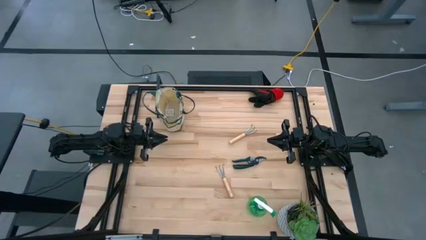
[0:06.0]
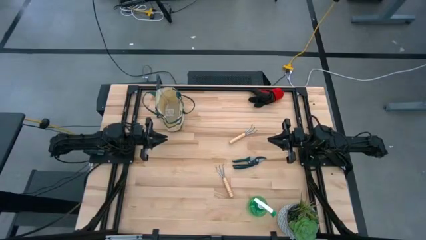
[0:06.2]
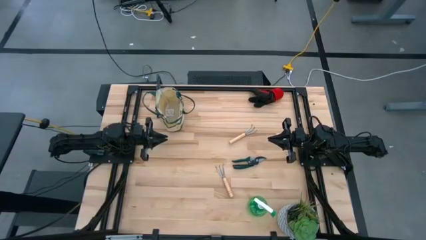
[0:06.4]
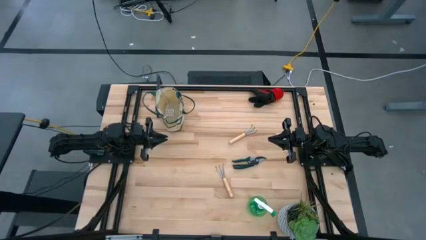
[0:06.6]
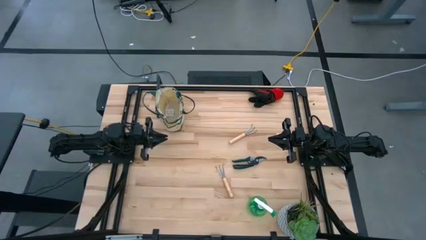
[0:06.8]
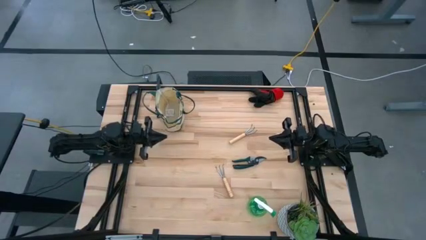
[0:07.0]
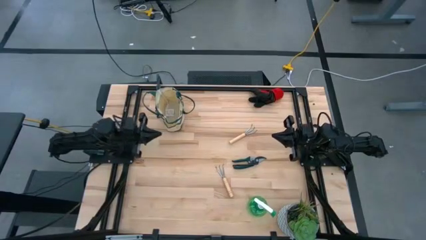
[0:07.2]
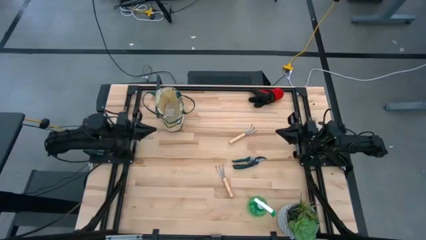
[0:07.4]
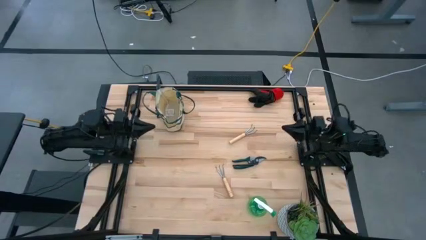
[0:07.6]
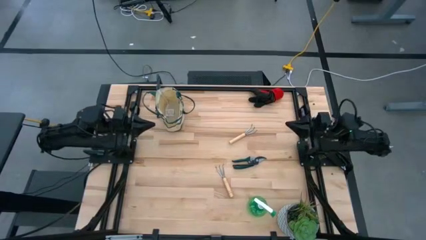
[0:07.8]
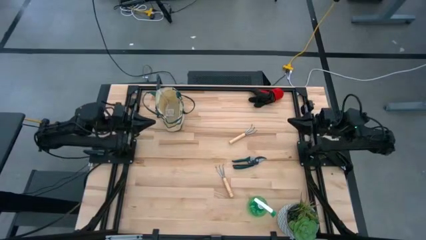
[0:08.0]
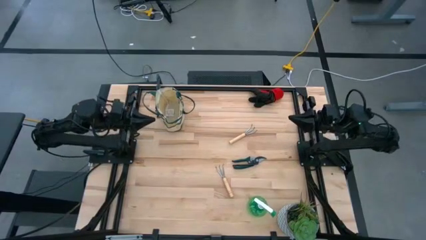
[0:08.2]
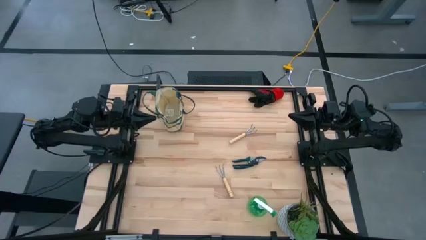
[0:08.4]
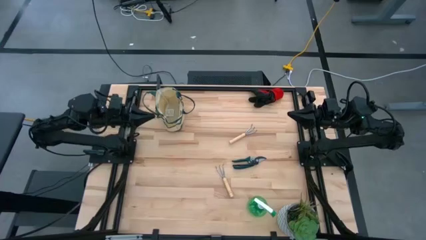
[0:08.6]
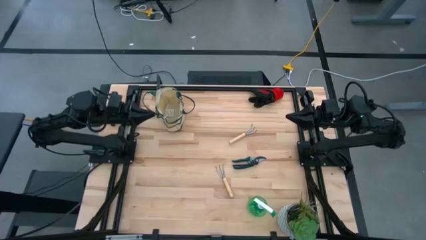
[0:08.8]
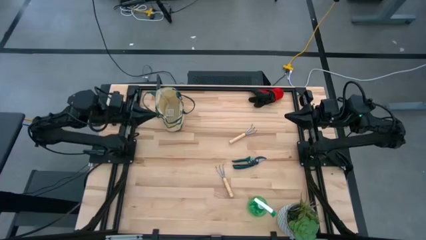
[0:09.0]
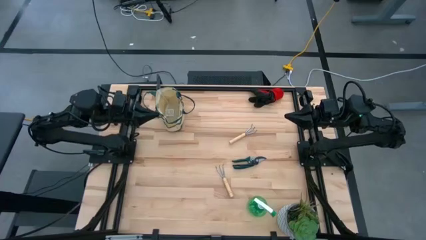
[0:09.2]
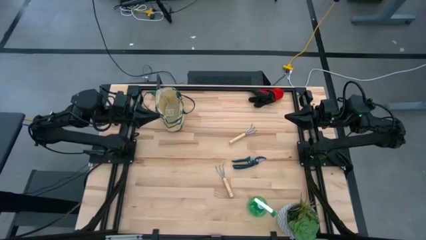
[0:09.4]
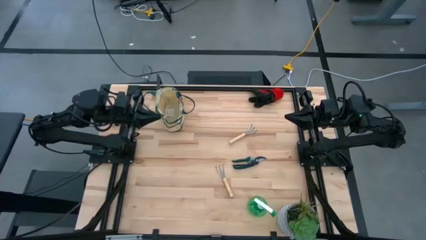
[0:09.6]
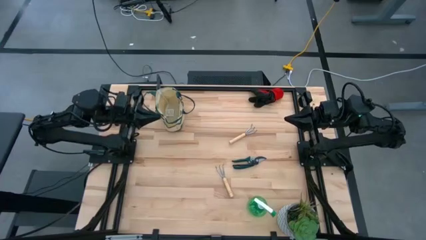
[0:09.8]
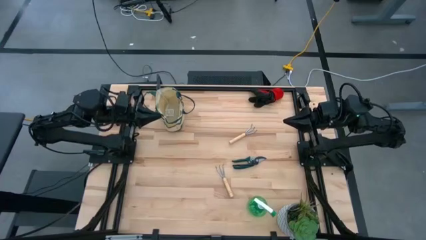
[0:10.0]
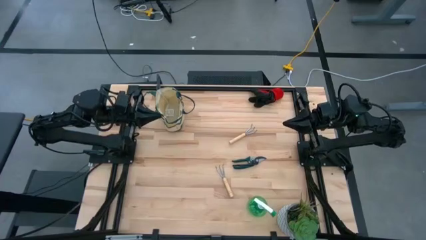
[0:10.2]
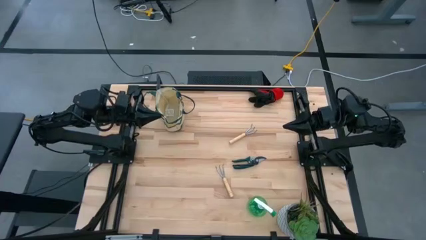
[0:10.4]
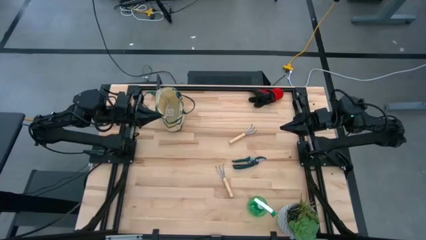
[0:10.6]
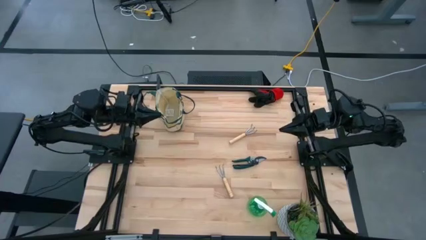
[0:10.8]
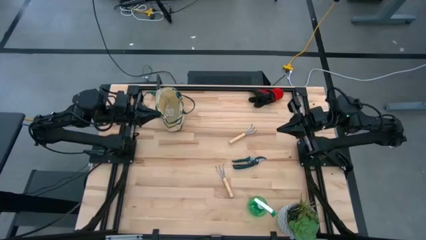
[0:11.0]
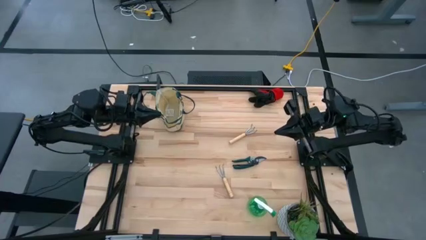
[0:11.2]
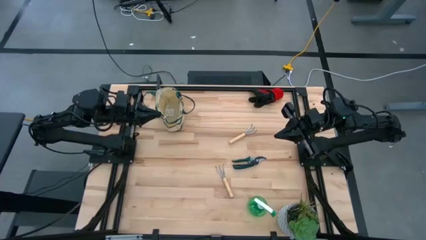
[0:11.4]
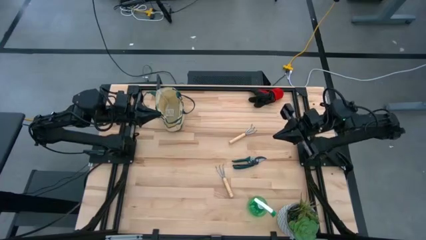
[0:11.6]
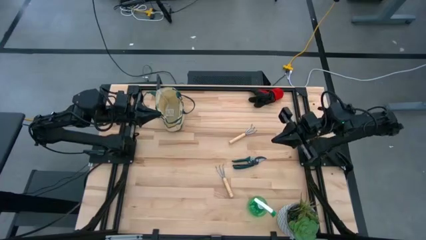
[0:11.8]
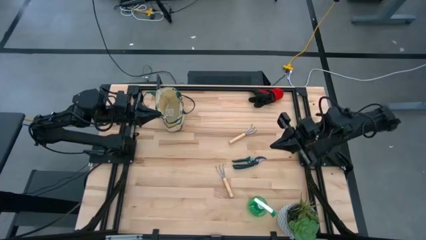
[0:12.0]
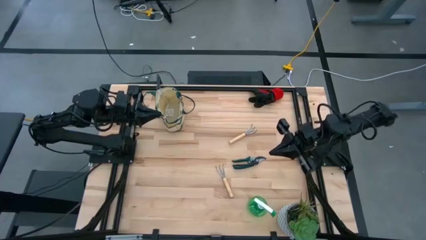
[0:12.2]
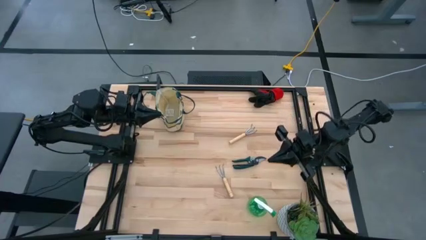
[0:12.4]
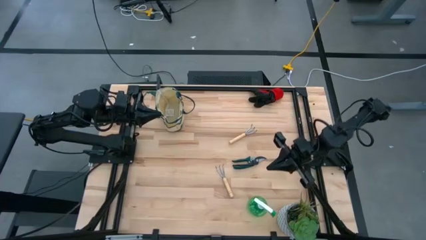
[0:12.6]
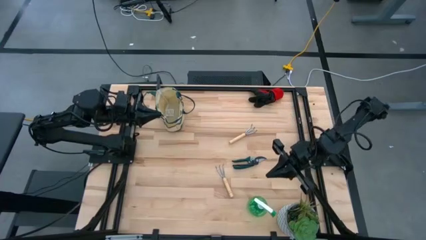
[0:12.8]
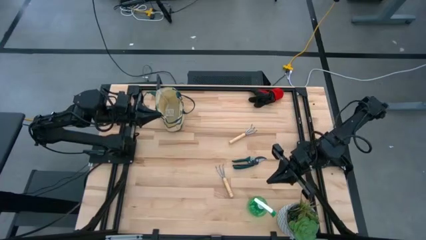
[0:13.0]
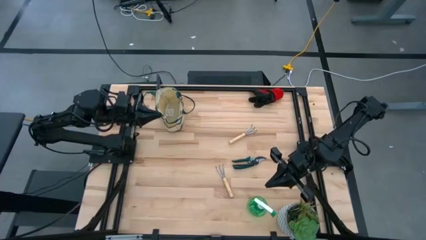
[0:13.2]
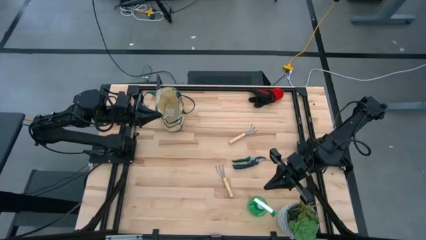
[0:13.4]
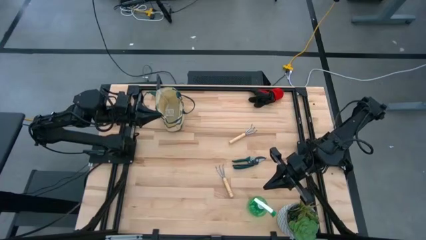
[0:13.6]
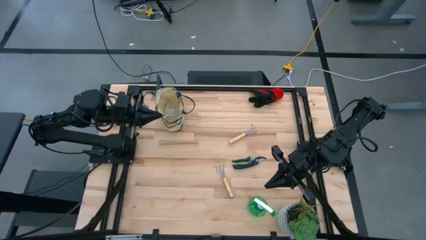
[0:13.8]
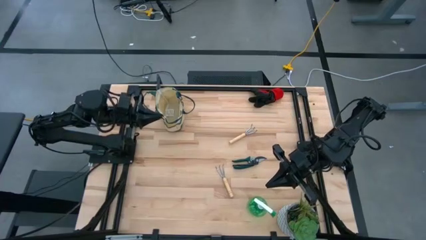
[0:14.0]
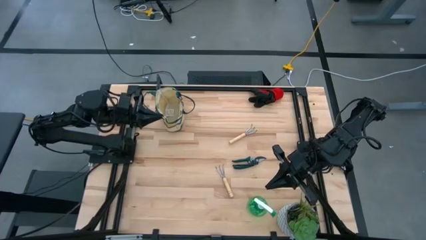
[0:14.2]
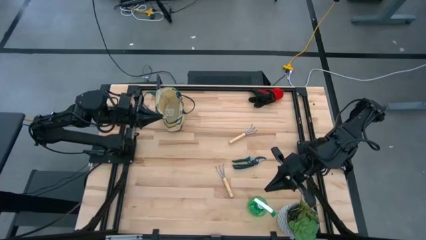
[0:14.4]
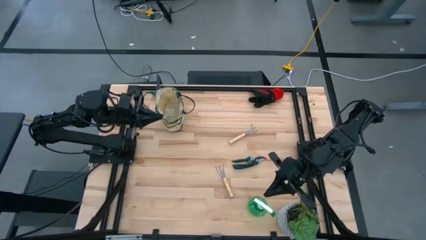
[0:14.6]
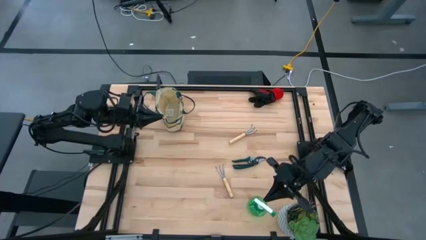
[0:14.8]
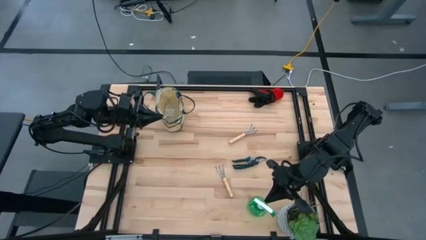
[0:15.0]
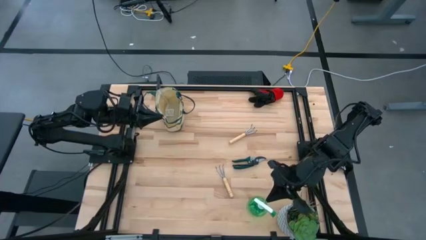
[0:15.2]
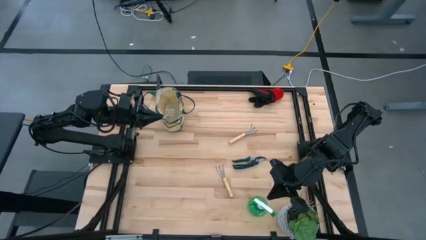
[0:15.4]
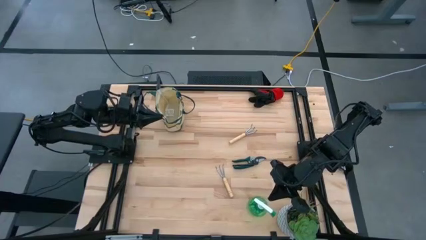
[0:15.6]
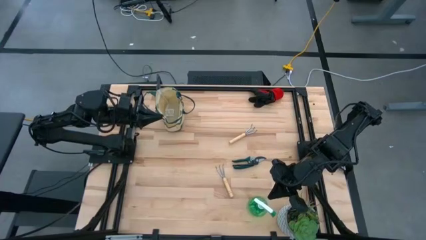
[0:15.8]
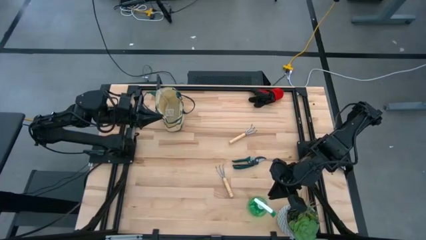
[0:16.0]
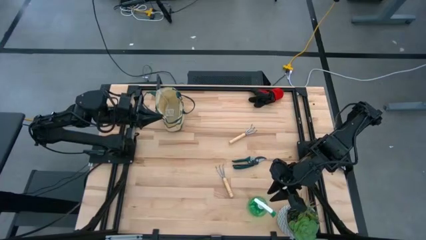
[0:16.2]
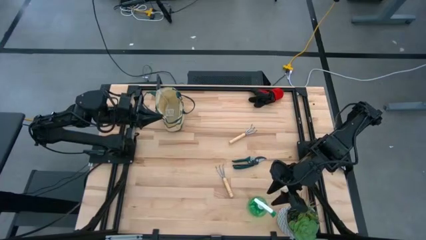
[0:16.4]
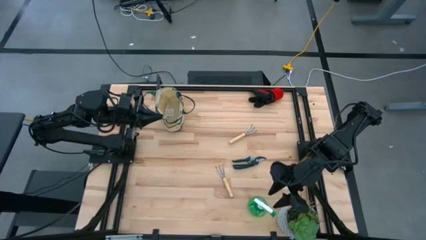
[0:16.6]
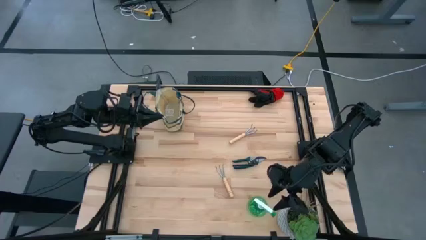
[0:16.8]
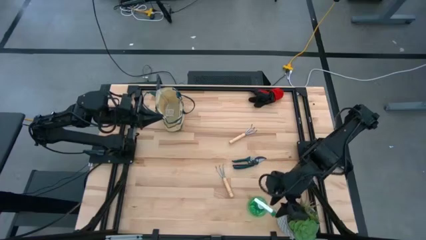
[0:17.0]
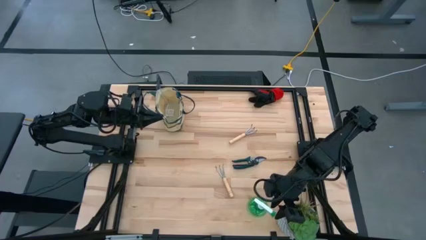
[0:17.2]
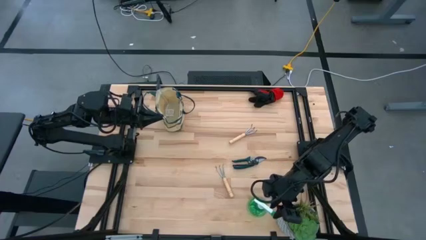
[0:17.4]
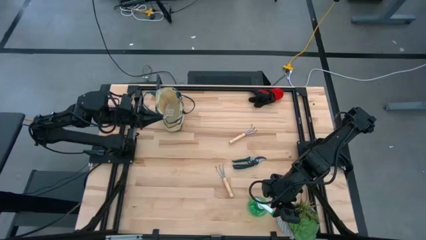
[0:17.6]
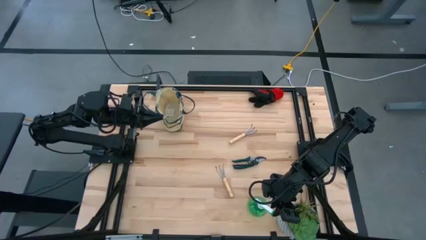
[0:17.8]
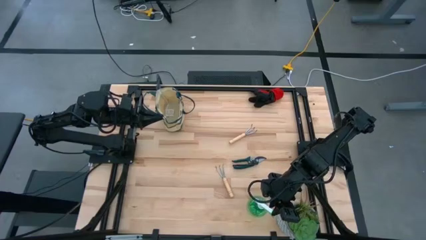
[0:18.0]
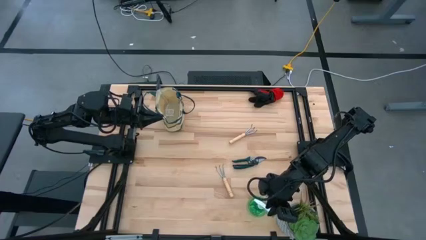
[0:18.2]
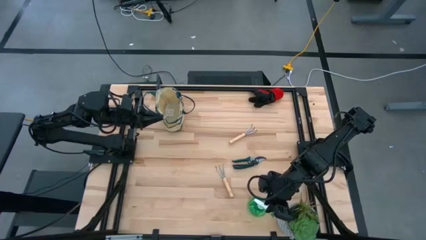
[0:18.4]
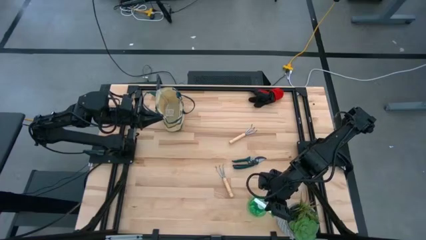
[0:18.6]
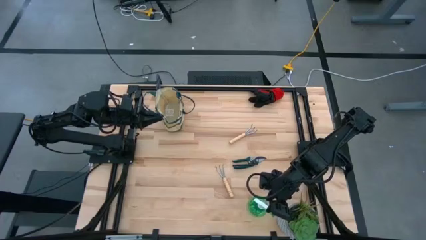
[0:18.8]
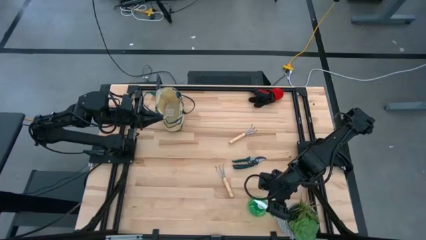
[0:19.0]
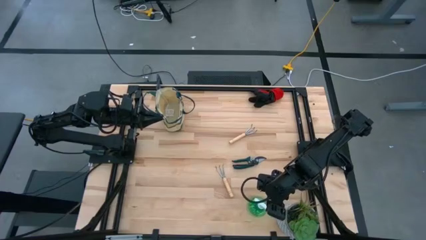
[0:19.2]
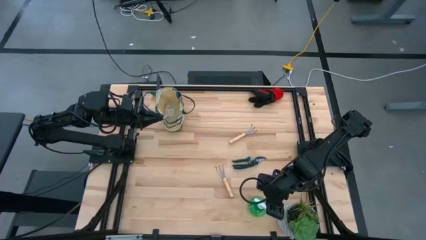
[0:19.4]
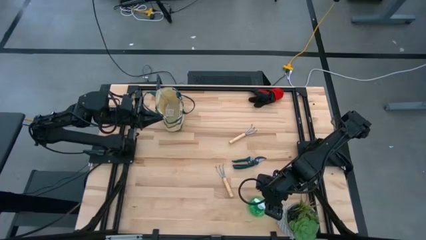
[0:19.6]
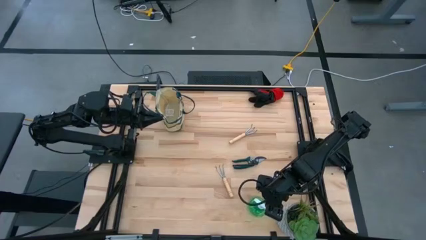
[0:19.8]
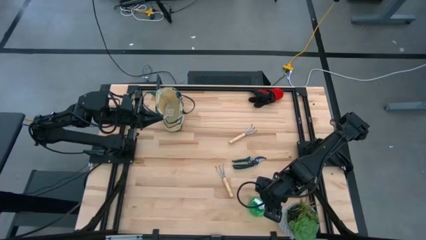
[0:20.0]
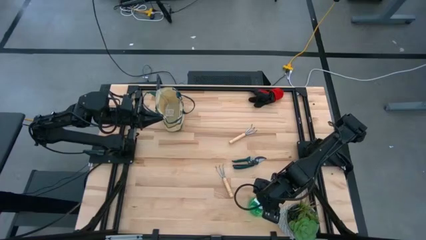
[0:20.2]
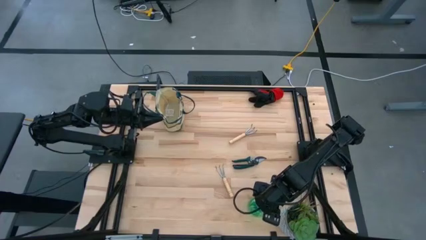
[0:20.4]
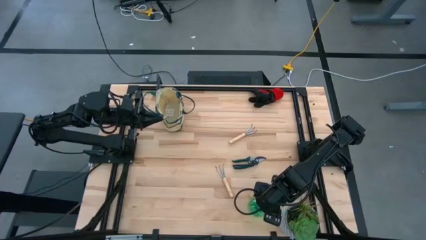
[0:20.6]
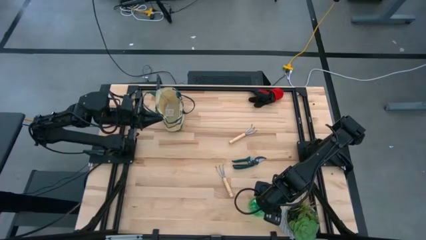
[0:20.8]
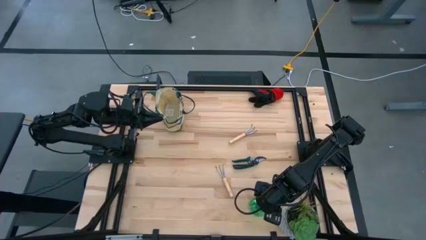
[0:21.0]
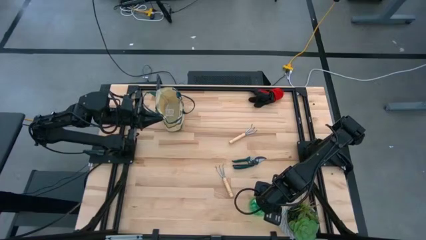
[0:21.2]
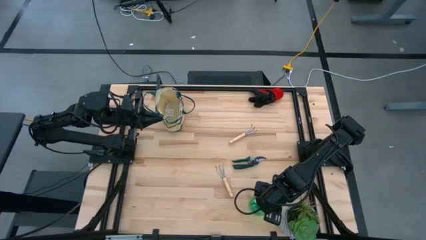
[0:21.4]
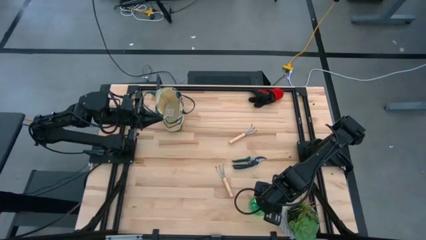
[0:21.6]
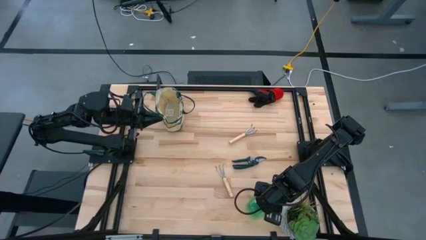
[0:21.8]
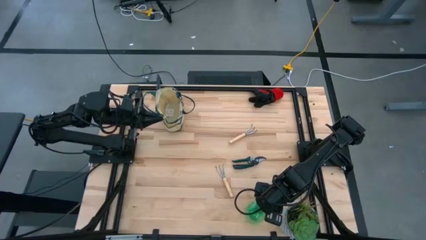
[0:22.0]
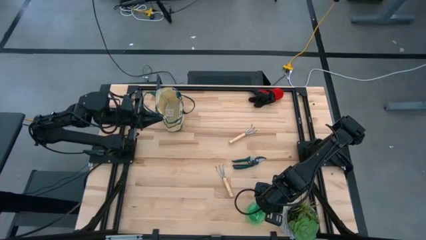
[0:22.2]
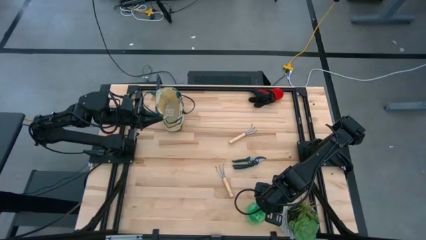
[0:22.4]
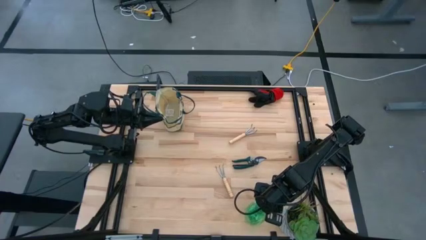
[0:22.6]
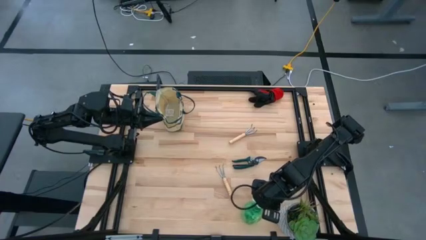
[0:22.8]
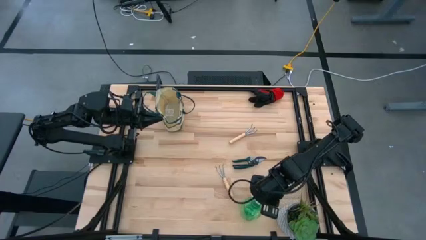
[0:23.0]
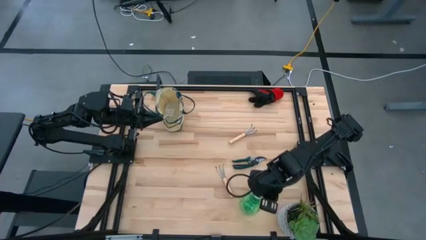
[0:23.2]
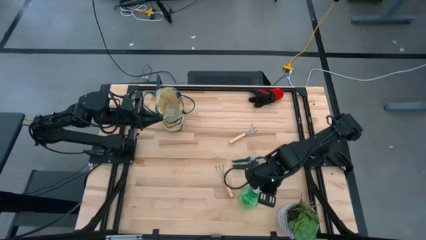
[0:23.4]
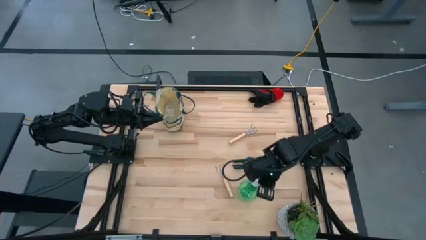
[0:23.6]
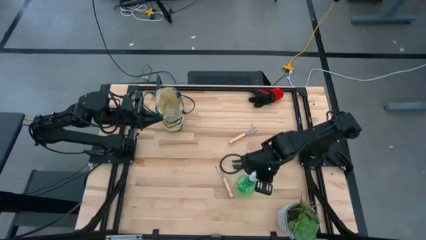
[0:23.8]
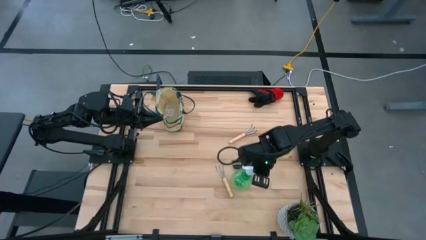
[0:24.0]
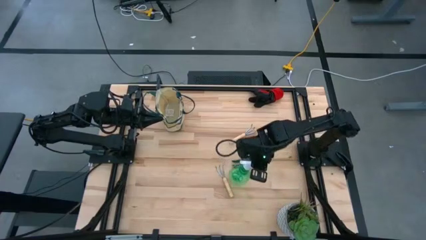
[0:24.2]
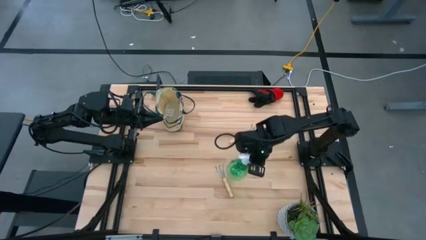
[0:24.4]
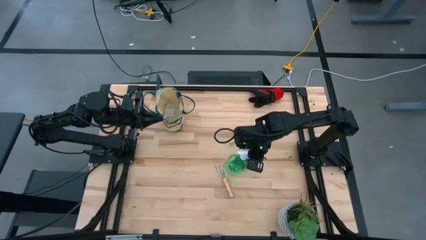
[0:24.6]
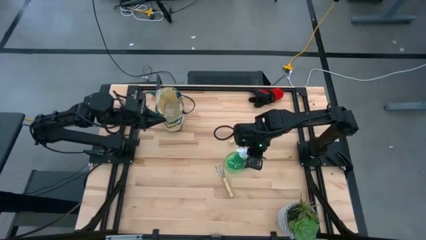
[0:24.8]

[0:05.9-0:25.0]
Task: Pick & Place Garden tools in Gardening bag
Put the green spray bottle into the gardening bag
